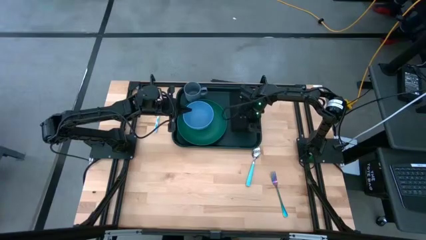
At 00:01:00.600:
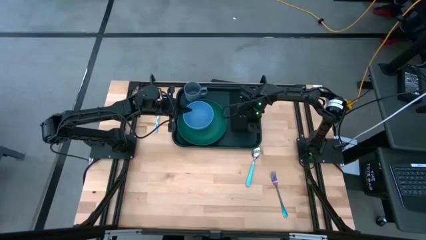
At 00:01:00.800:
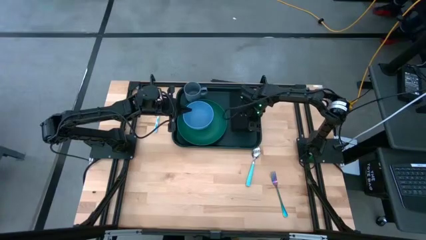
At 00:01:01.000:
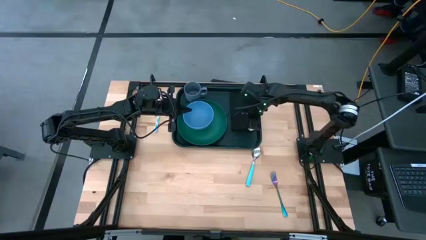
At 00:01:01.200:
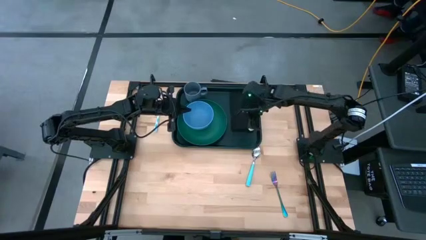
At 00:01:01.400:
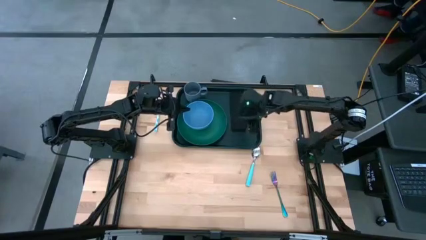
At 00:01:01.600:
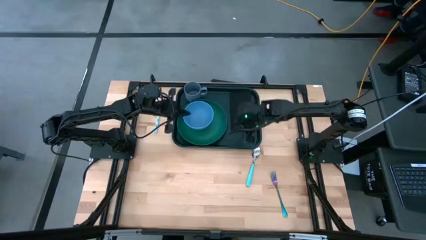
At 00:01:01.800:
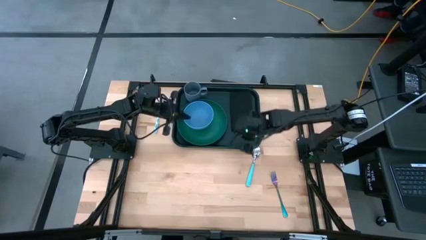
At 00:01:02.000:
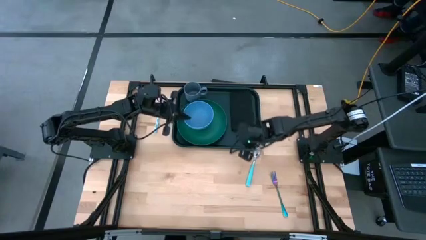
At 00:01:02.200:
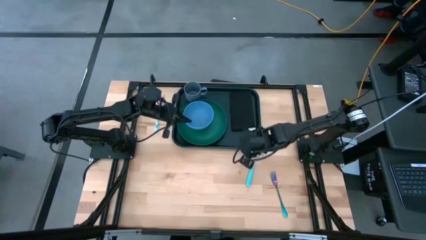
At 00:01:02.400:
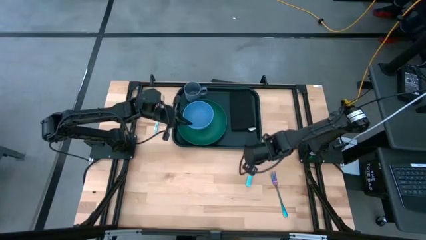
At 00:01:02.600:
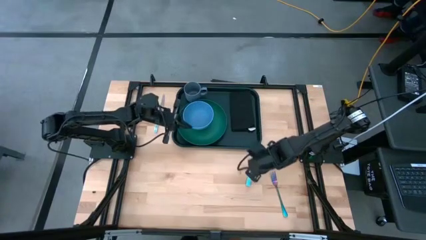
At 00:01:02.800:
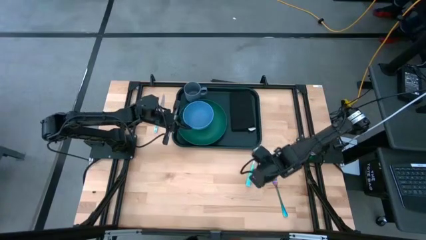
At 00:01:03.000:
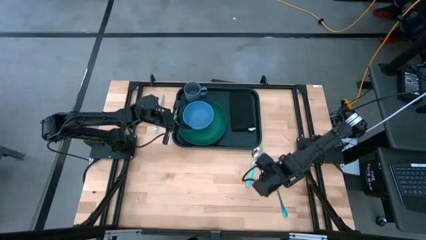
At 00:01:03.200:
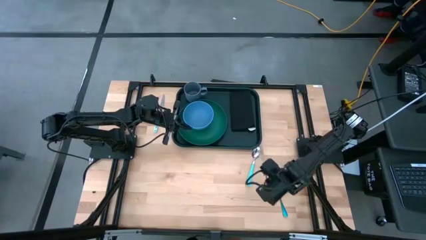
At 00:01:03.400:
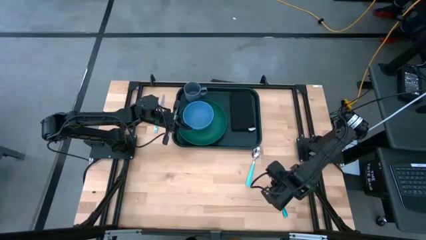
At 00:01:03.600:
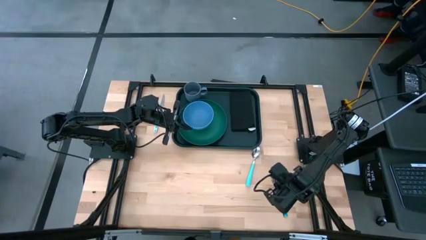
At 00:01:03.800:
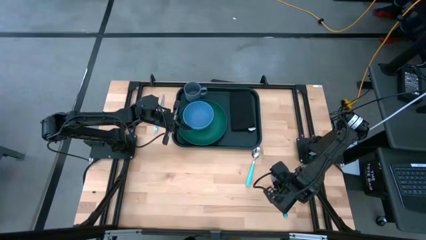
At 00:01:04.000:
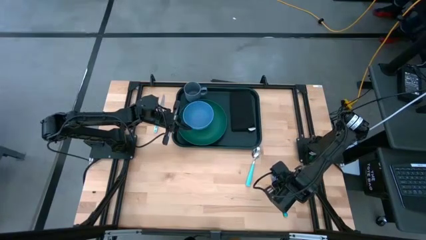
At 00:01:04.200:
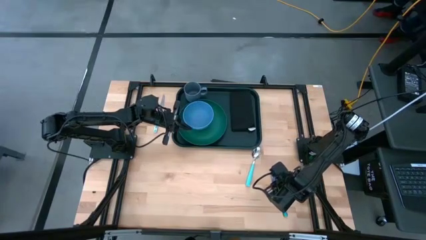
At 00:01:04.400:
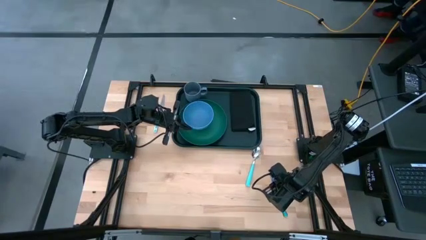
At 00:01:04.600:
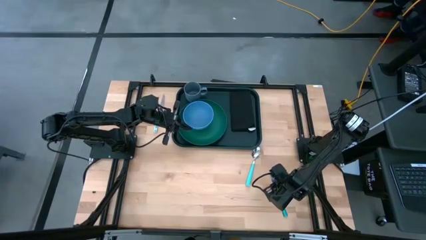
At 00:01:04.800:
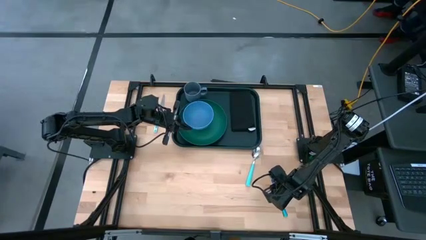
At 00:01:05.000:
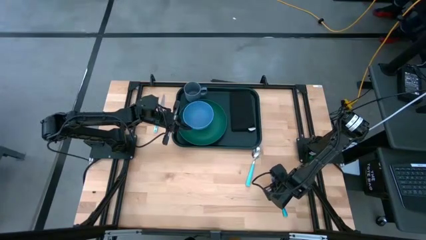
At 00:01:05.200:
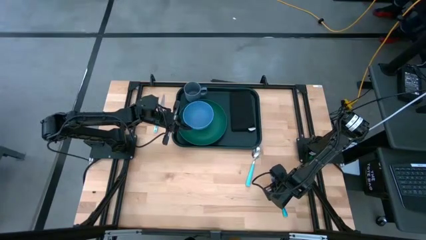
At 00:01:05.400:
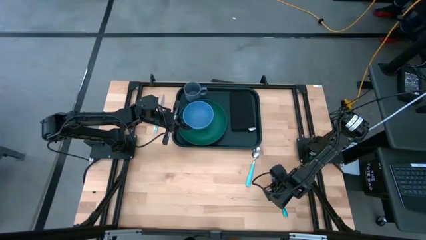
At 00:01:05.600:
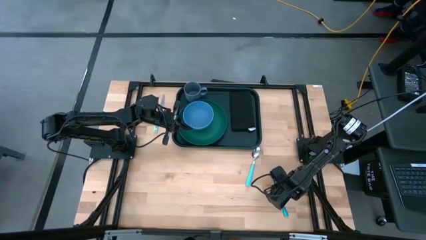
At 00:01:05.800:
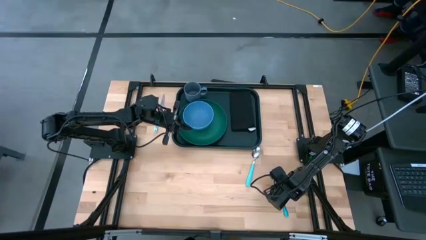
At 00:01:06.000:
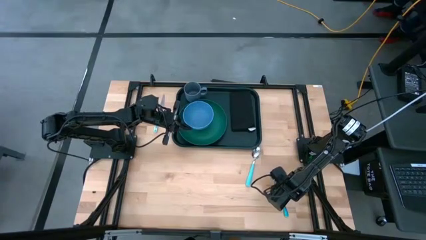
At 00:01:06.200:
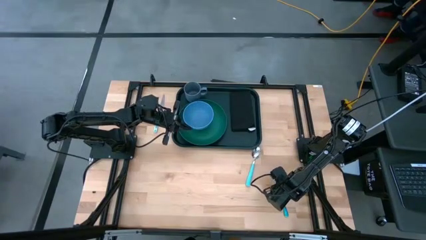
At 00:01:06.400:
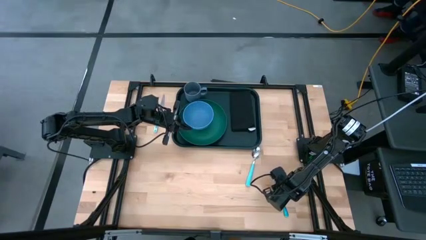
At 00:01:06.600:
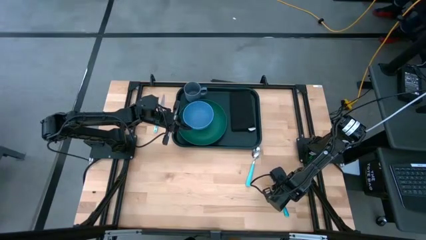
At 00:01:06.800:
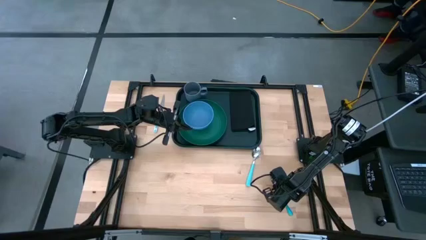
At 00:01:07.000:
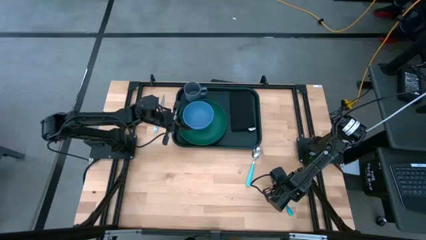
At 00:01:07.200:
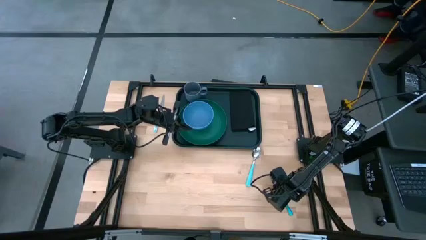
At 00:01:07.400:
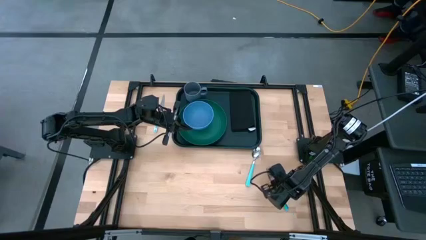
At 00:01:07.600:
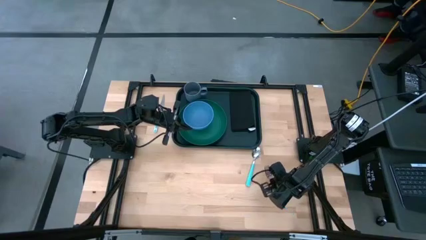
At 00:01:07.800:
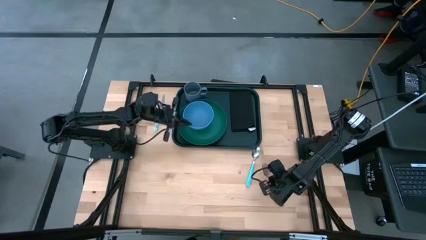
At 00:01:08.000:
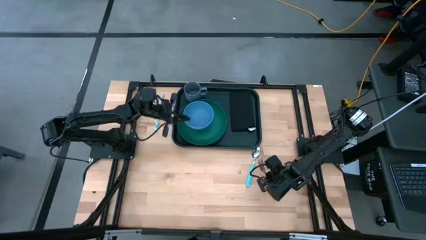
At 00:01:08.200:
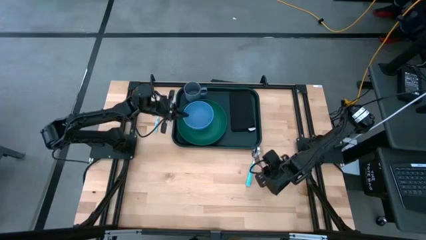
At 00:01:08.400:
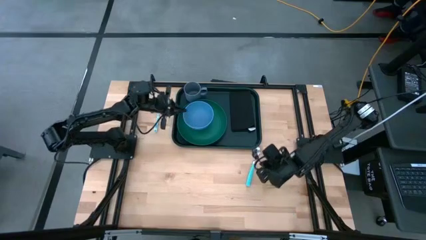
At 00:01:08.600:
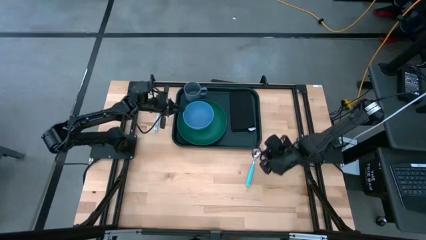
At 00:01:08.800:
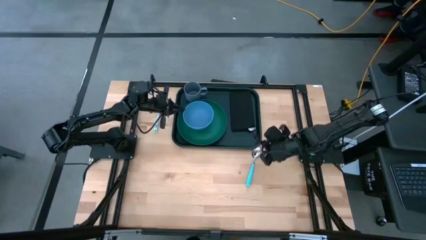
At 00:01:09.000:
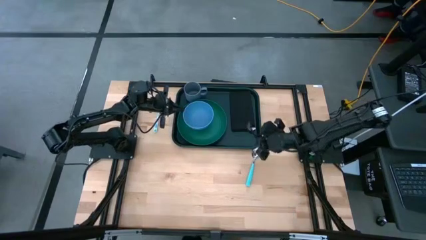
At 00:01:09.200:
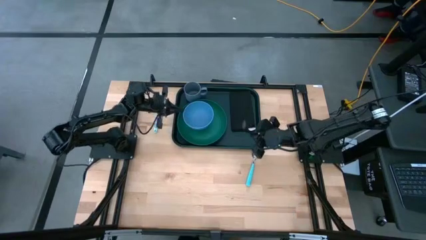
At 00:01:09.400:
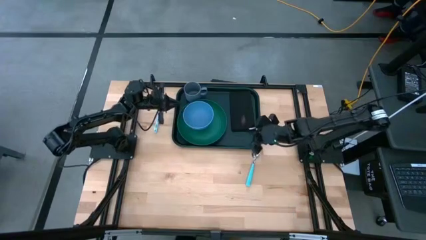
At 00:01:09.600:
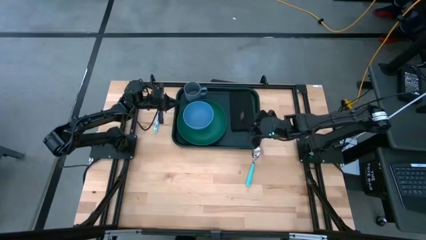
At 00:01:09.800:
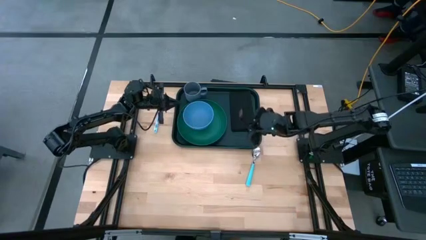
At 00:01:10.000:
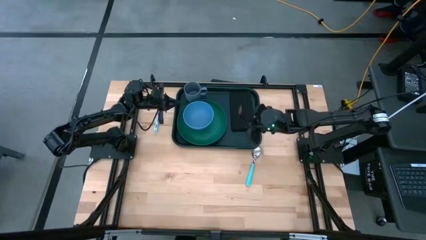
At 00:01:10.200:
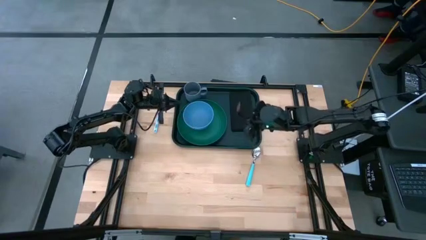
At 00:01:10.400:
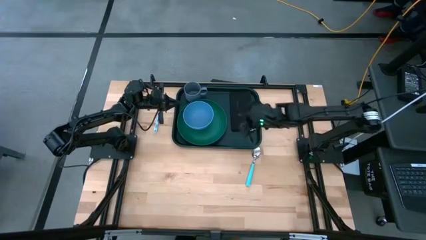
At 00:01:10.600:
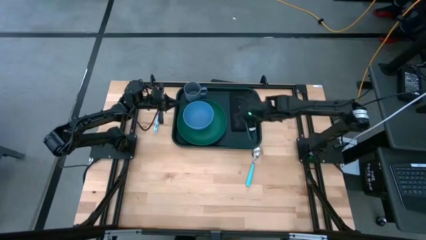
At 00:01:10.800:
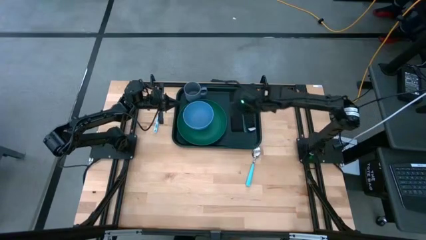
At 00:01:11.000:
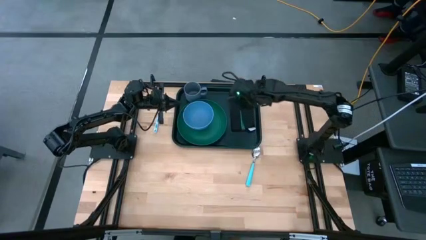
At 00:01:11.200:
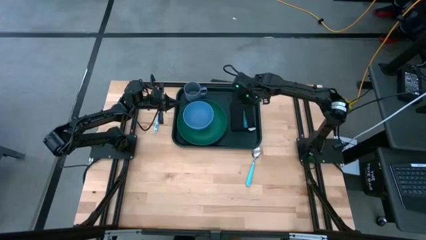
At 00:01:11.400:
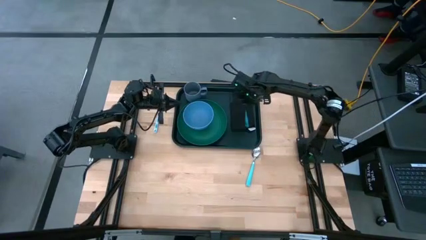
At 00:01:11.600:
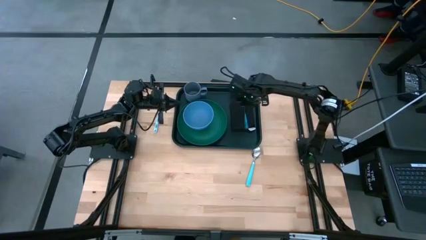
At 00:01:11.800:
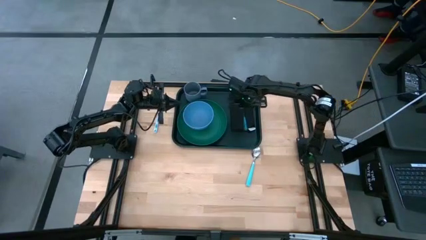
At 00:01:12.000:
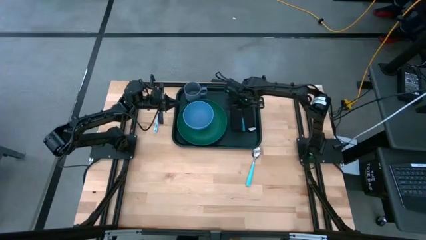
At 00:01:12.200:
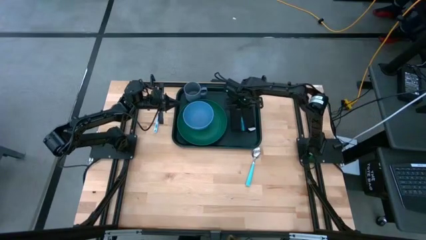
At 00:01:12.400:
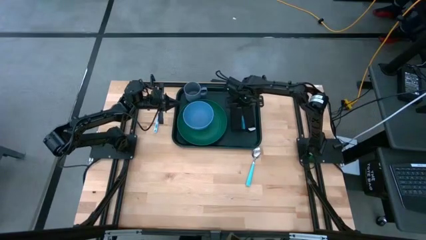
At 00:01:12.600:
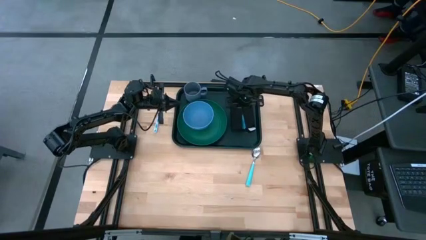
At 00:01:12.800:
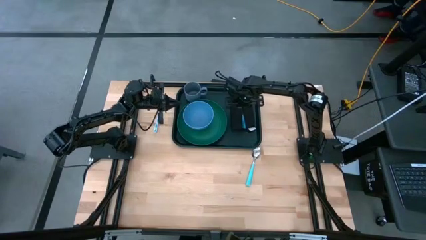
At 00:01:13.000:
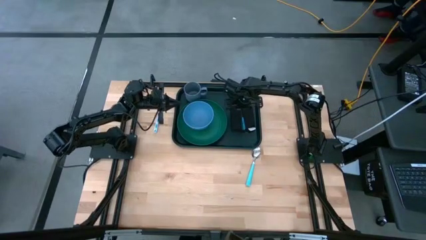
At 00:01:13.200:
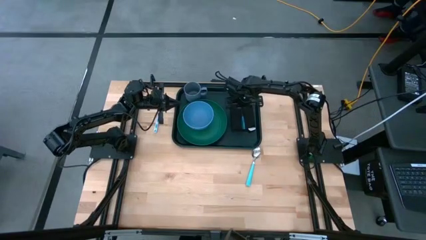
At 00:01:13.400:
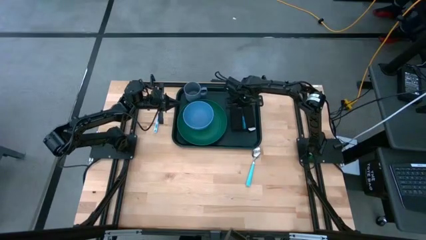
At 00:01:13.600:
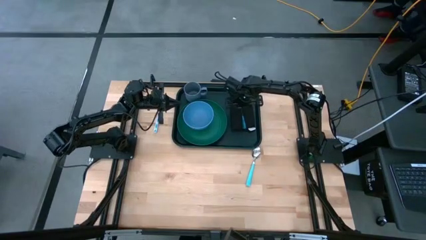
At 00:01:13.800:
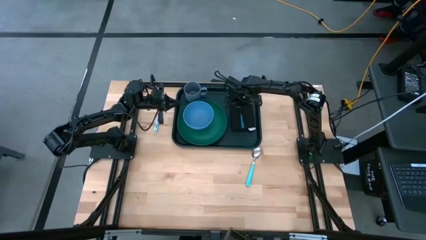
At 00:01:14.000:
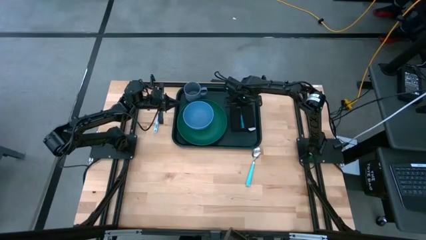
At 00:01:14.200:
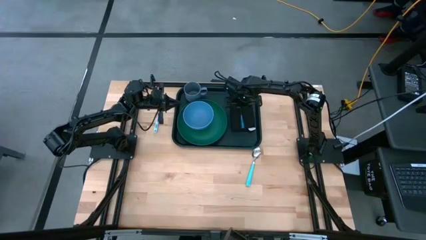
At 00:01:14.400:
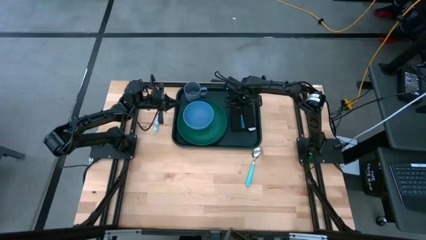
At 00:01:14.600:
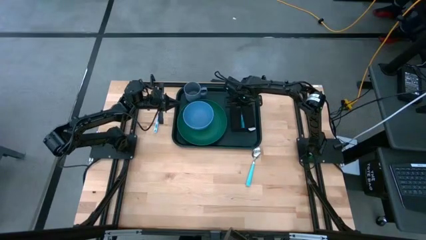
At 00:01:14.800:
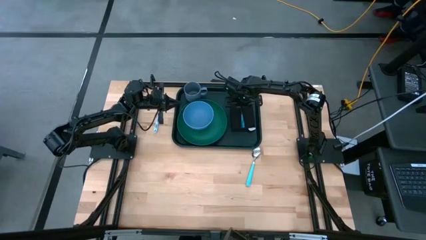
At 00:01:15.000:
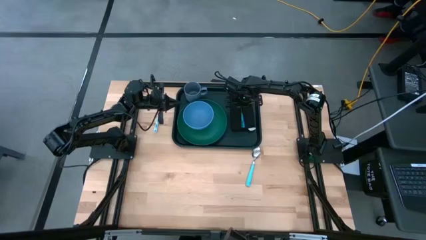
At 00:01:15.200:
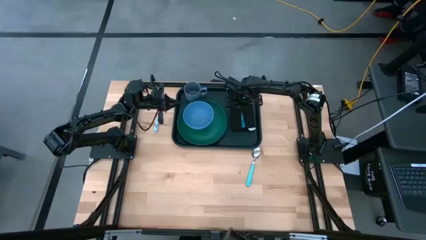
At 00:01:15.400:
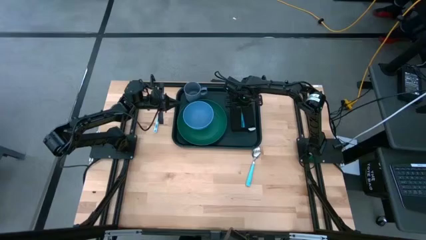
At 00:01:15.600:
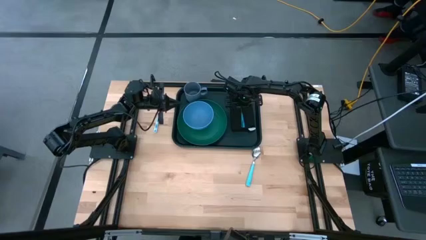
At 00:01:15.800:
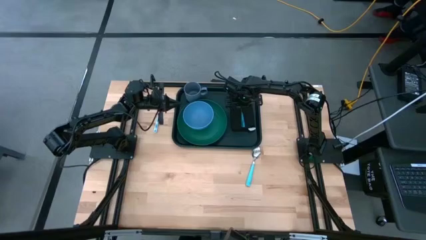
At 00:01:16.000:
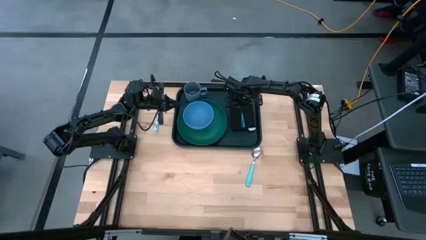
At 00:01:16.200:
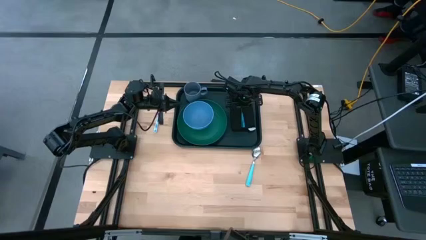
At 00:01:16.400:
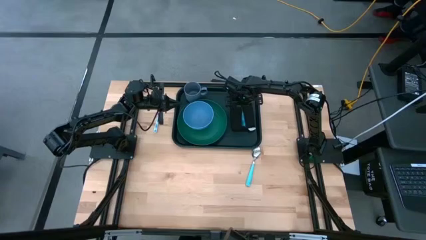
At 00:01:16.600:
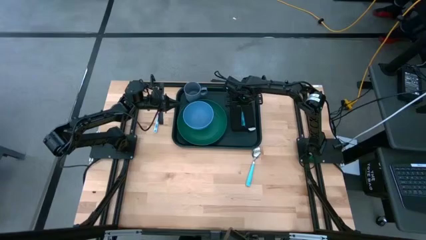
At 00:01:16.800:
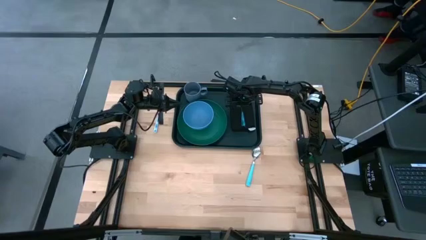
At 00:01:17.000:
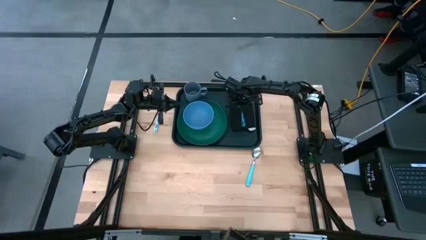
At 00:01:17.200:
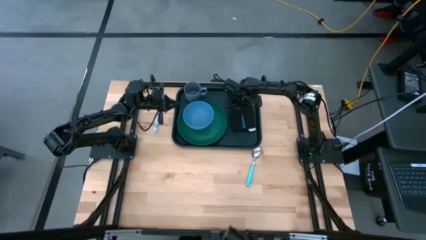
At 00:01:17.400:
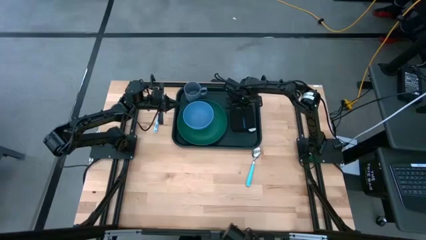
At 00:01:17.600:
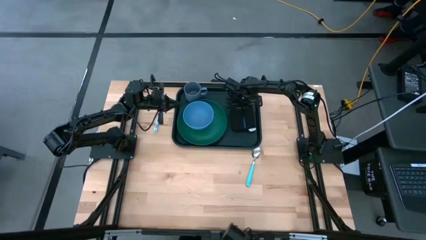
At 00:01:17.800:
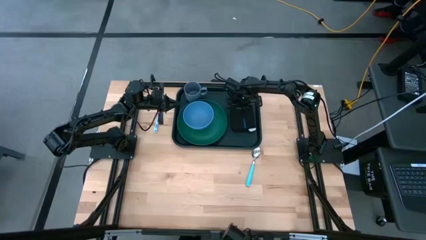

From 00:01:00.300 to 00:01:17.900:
Task: Set up tray
Put the blue fork on the black table napkin on the black tray
